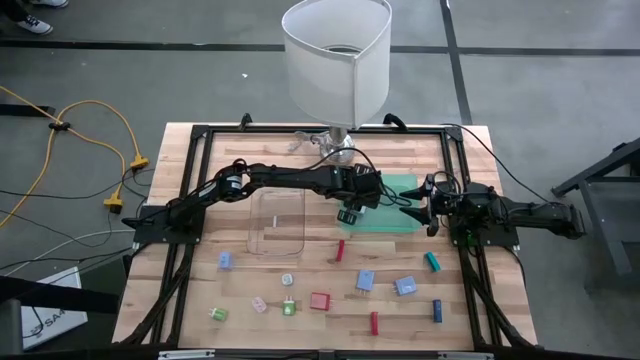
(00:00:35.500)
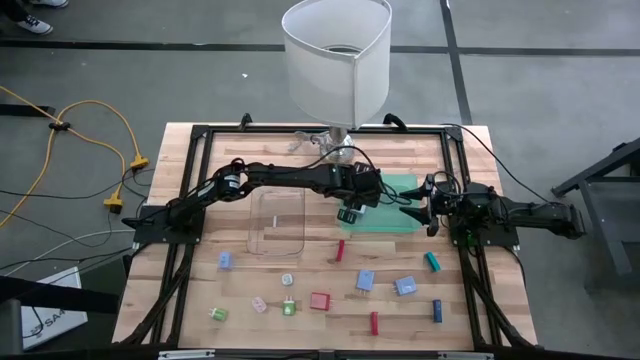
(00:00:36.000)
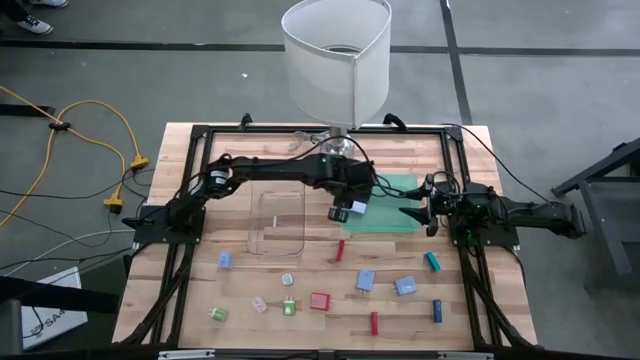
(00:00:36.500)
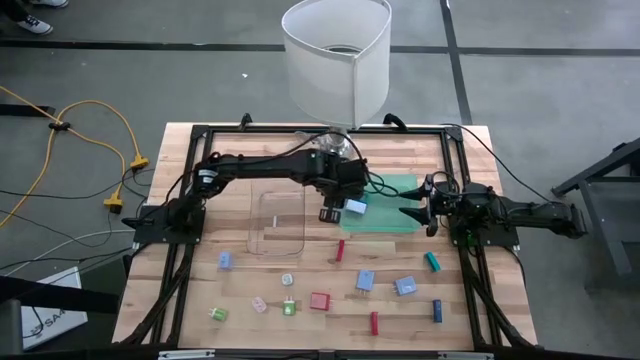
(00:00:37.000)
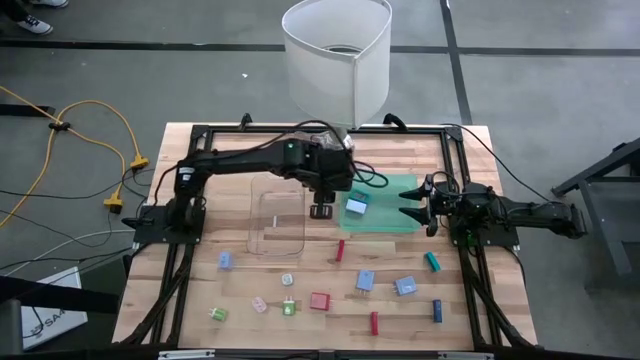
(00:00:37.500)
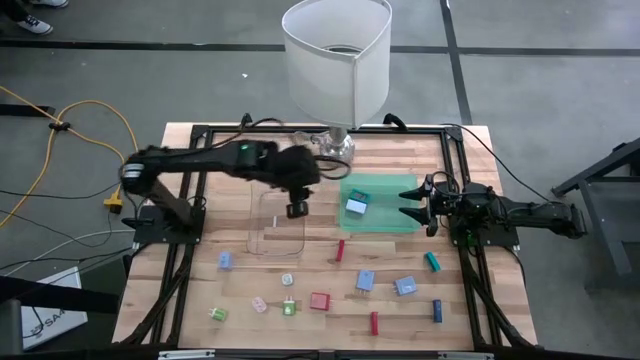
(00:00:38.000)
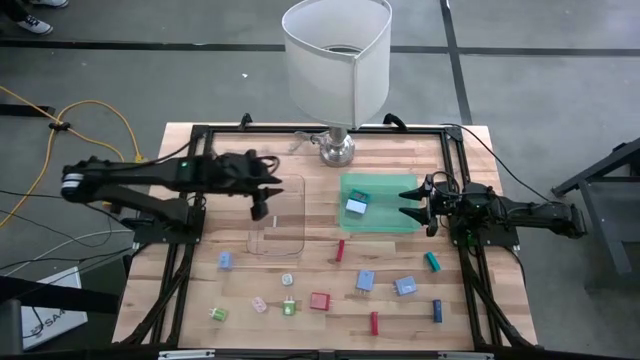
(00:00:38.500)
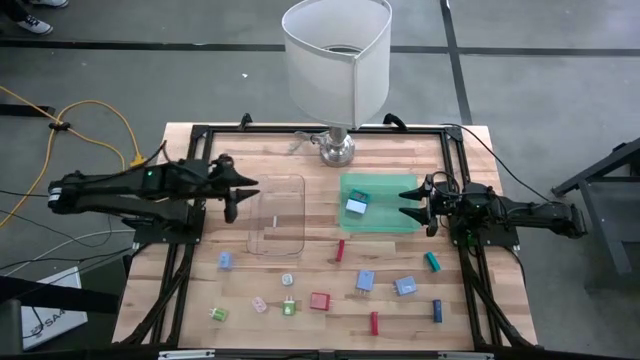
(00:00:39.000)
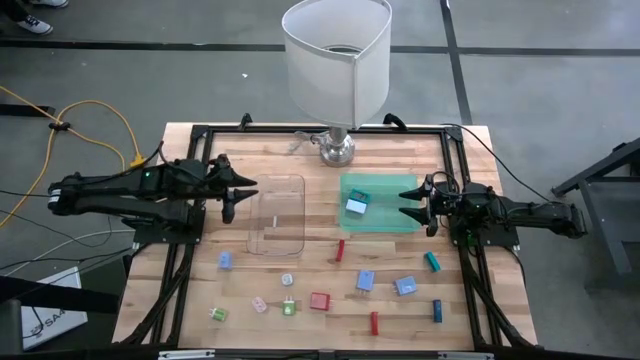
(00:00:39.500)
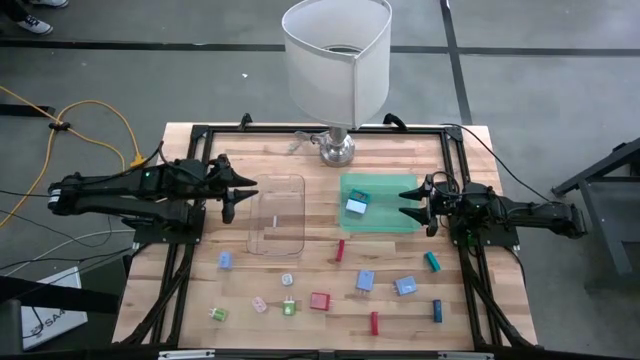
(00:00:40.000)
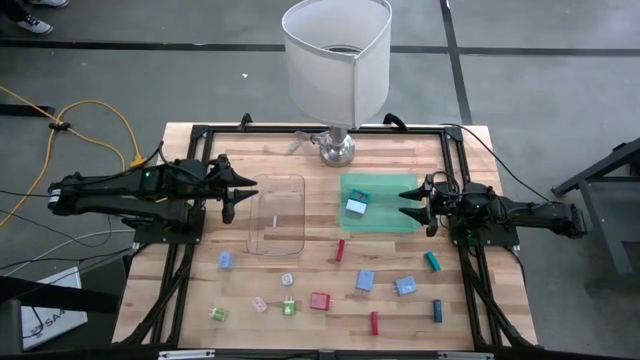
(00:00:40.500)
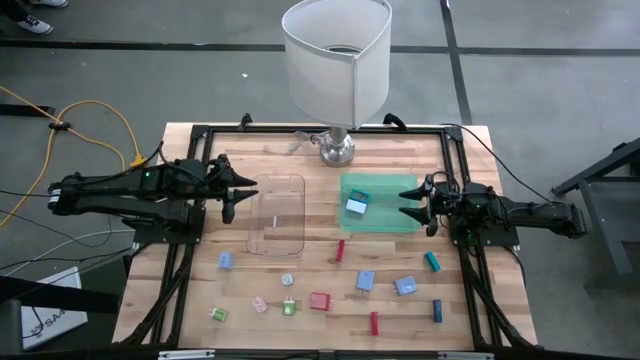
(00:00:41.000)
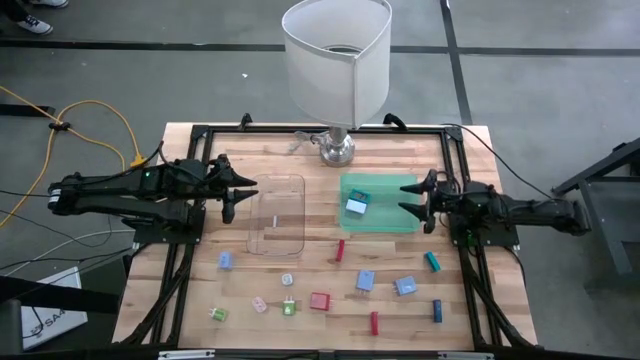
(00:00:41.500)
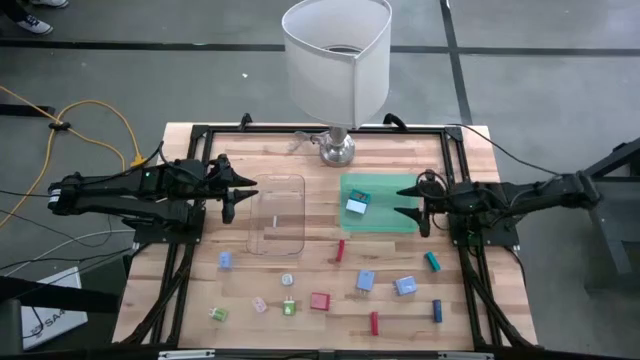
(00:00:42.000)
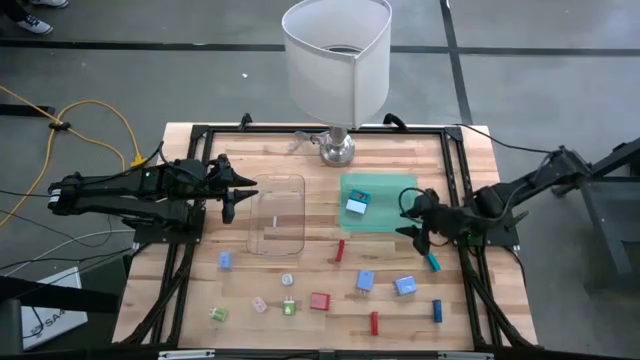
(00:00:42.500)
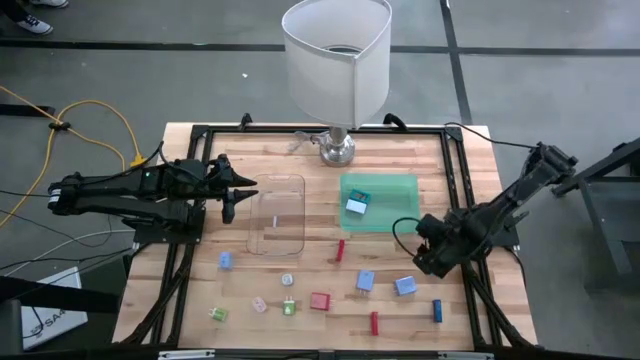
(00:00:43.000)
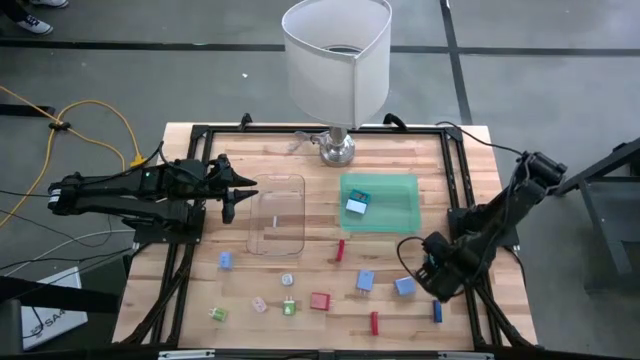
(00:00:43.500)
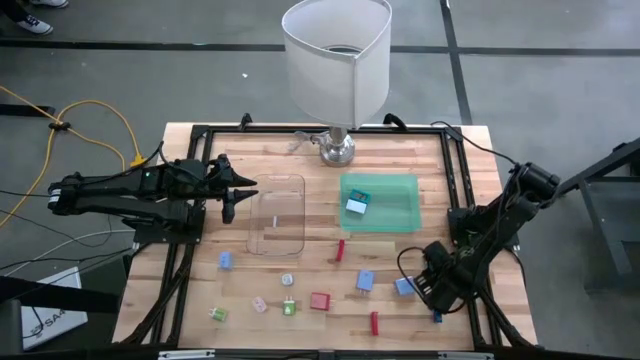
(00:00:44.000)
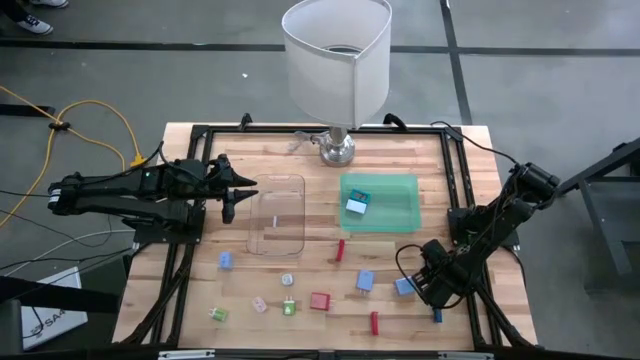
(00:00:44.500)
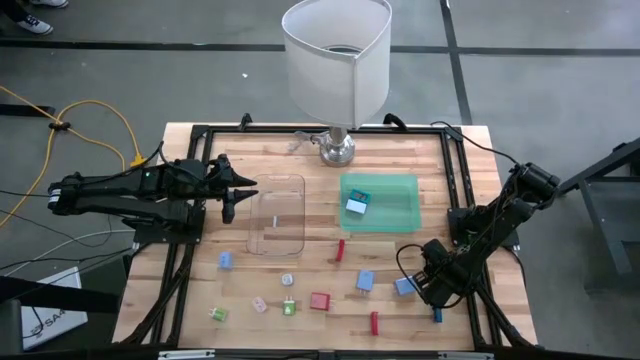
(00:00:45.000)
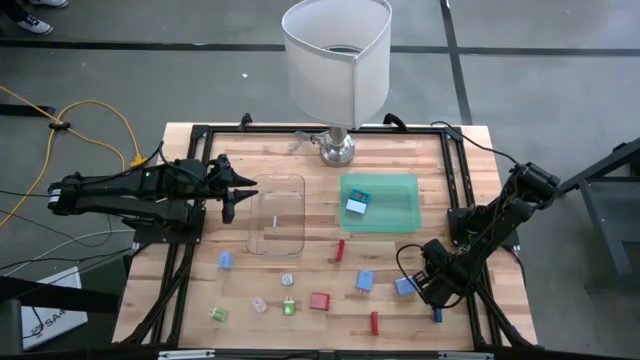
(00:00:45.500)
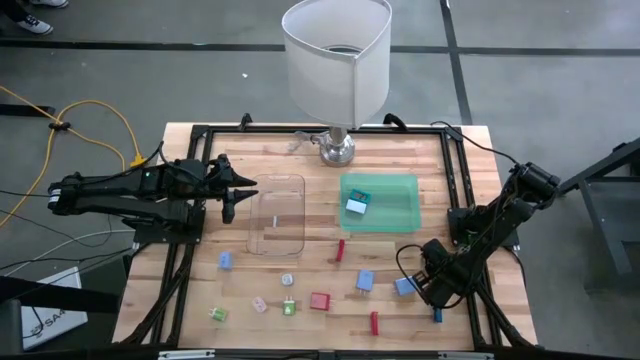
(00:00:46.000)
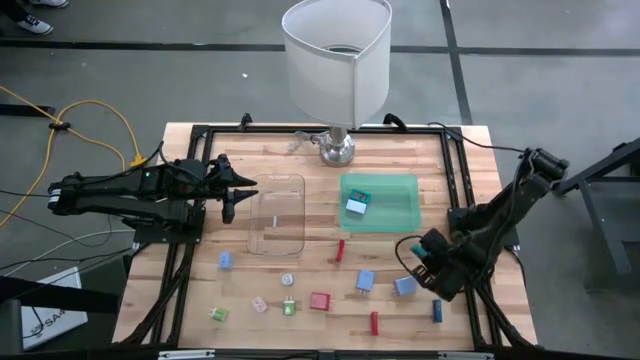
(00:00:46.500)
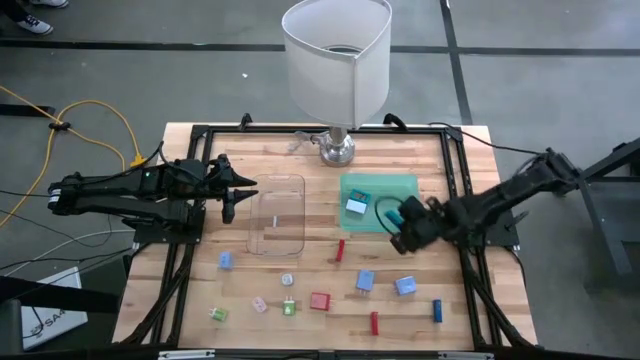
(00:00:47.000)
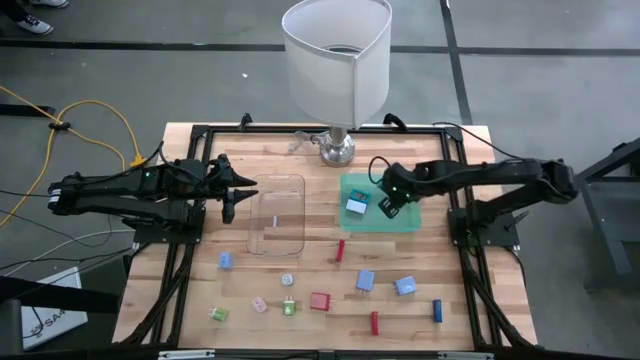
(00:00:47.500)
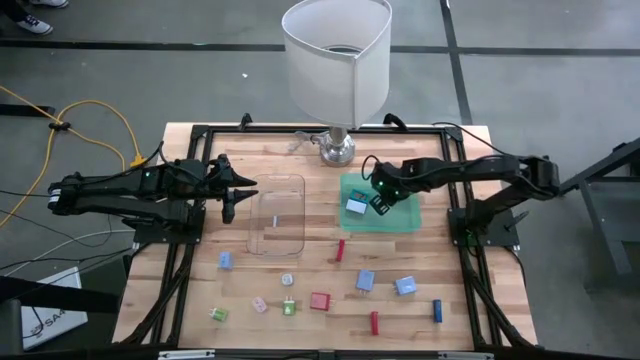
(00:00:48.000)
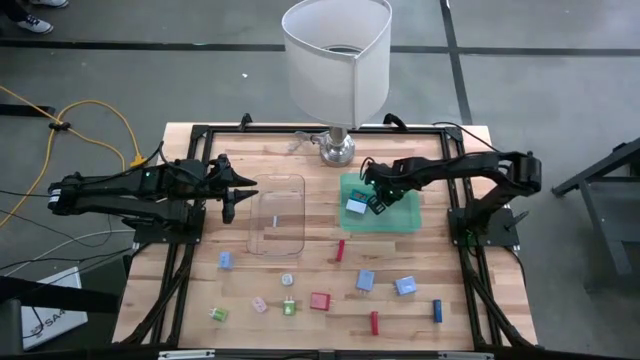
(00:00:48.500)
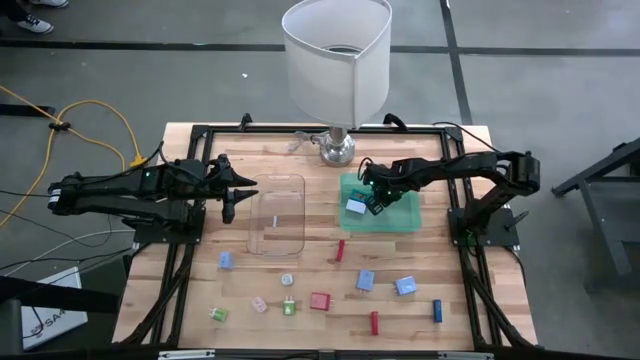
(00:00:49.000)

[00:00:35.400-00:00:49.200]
Task: Pick & Place Office items
Put the blue timer into the green bin

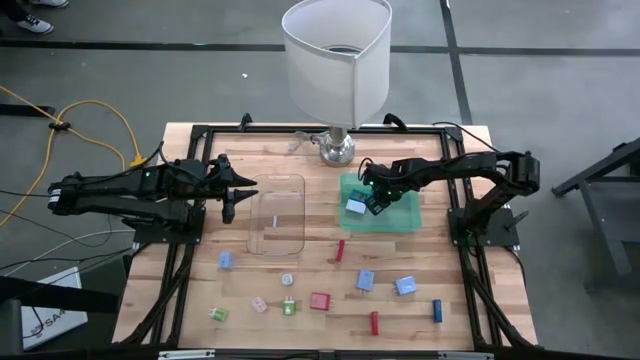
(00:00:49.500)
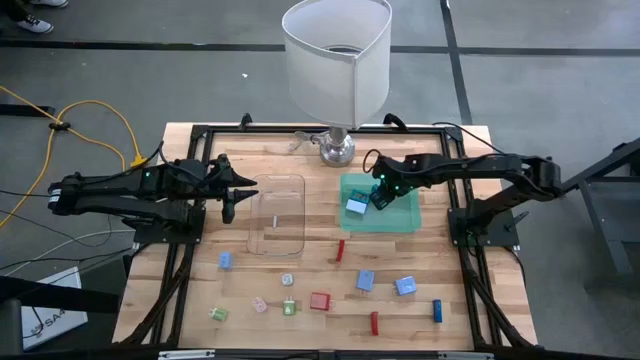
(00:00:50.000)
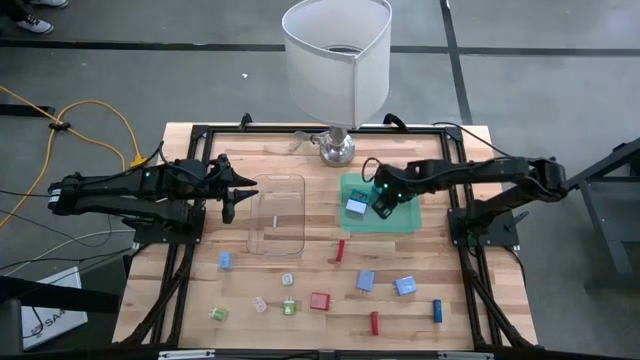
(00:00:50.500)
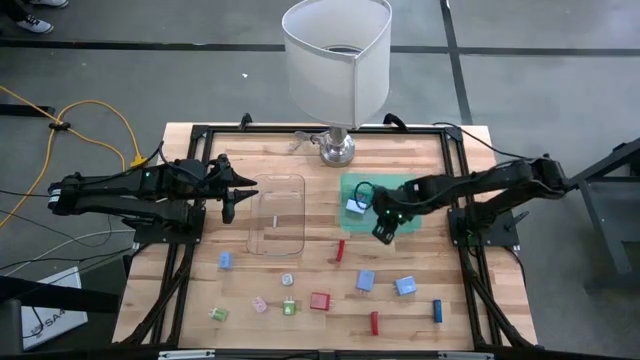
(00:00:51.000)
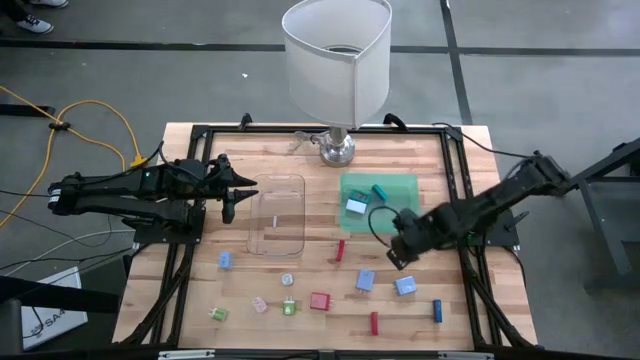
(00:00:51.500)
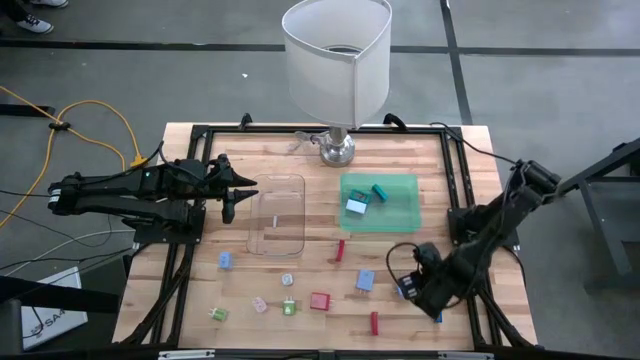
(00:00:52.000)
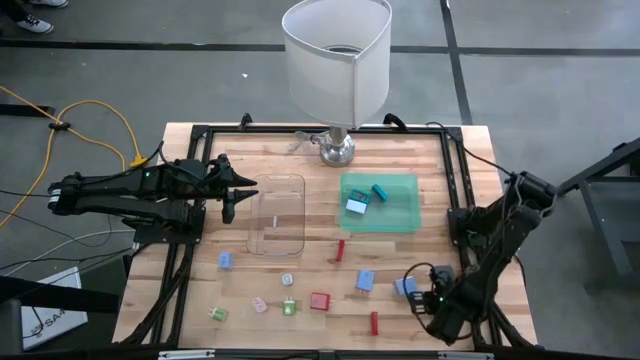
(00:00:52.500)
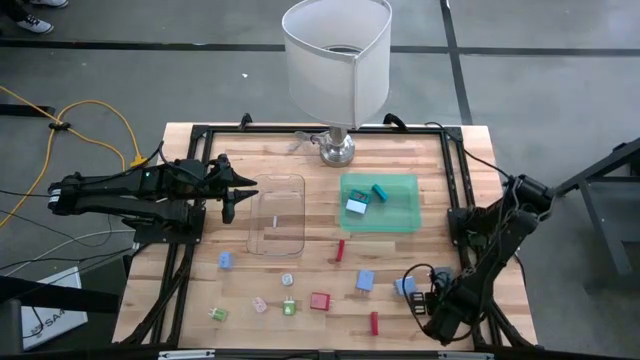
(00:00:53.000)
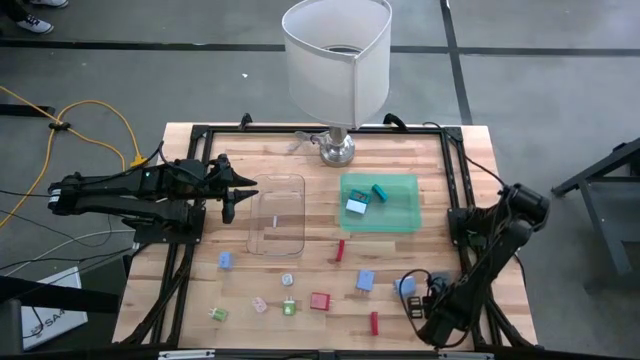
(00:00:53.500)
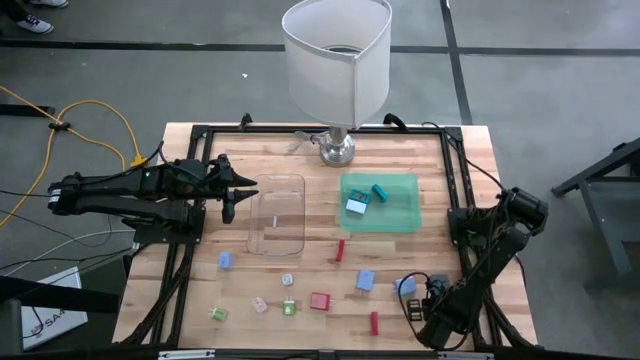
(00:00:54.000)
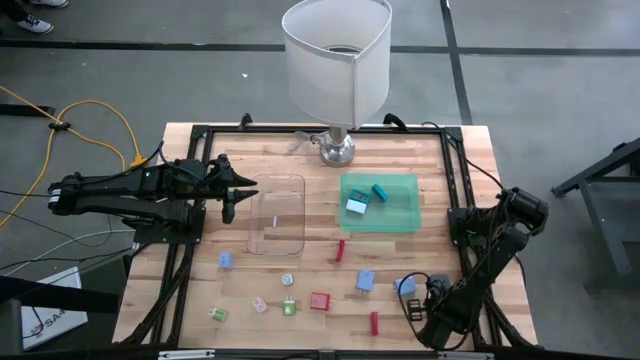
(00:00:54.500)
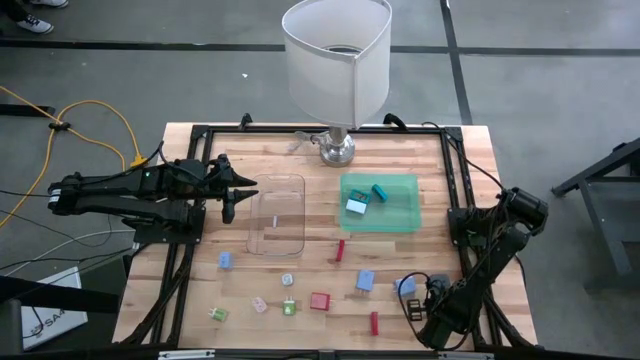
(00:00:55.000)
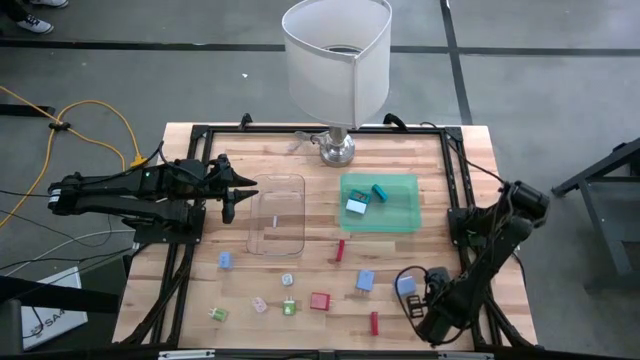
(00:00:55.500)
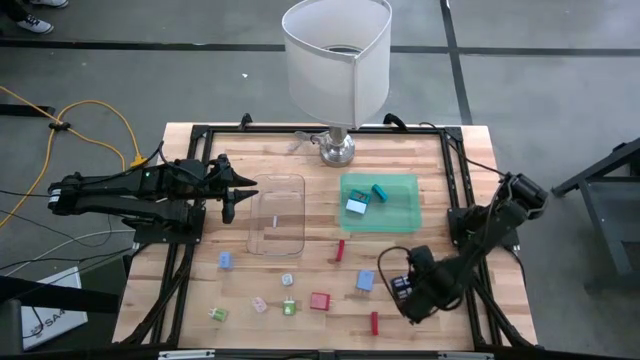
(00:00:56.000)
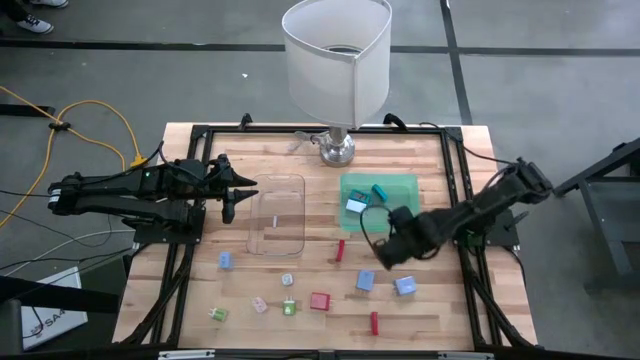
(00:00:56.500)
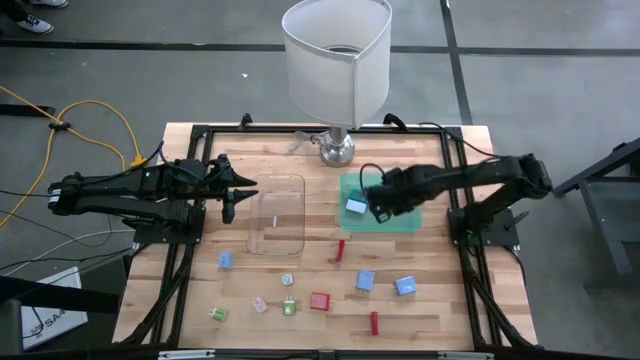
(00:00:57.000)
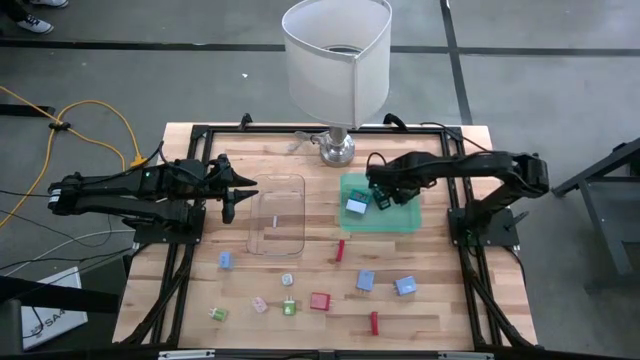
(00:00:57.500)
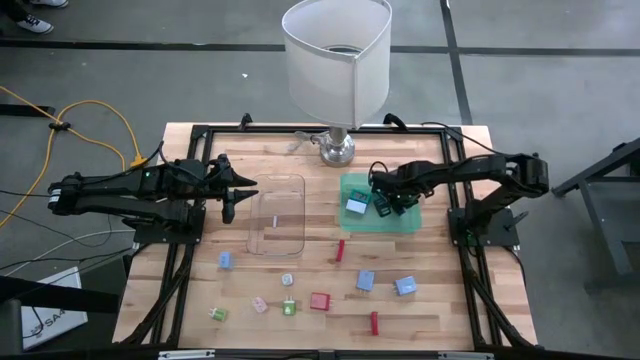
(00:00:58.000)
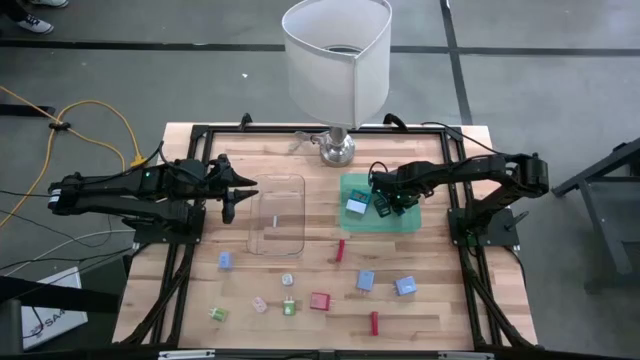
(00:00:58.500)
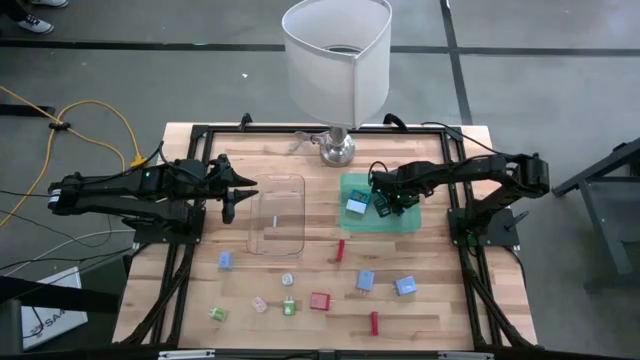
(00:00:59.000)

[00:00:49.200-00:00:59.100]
Put the dark blue timer into the green bin
